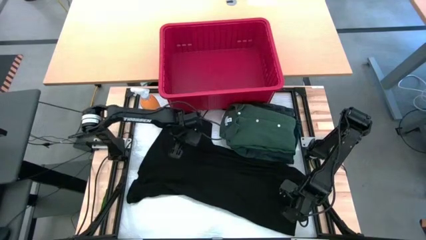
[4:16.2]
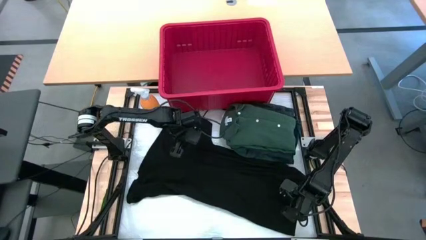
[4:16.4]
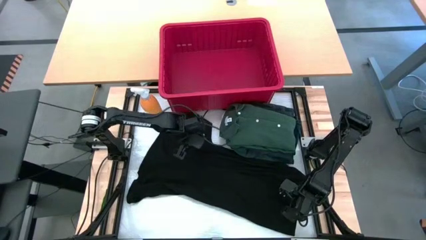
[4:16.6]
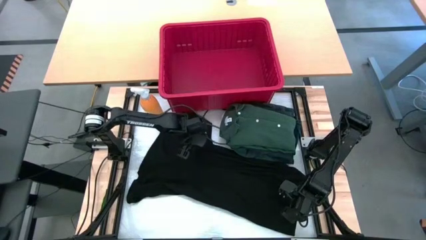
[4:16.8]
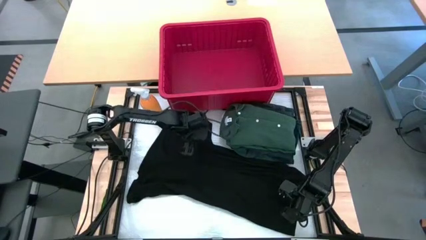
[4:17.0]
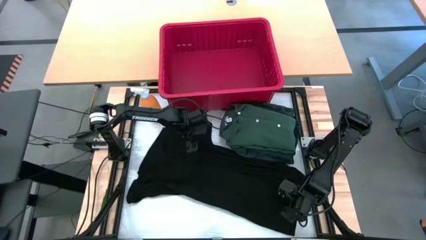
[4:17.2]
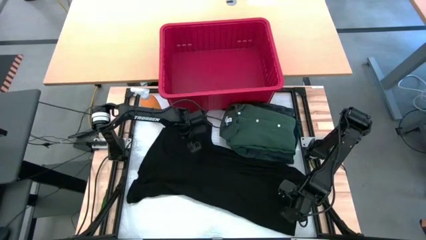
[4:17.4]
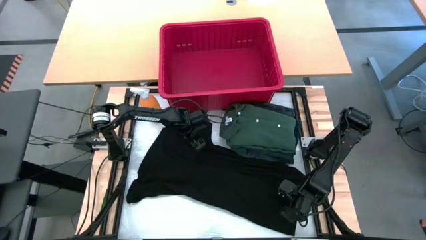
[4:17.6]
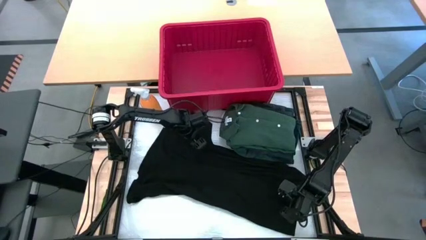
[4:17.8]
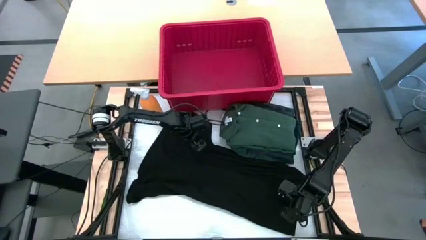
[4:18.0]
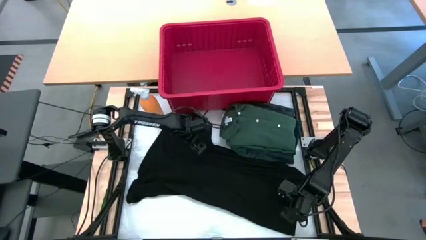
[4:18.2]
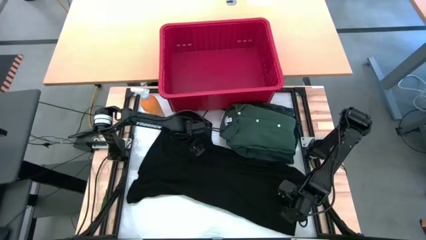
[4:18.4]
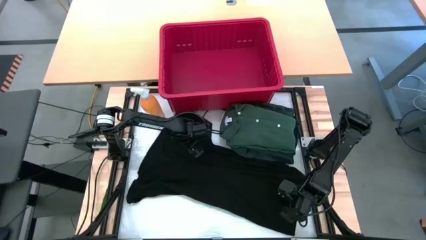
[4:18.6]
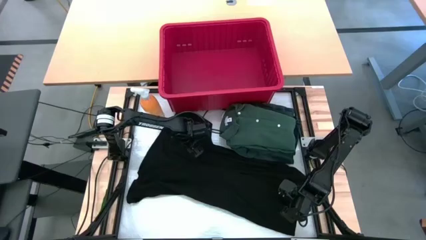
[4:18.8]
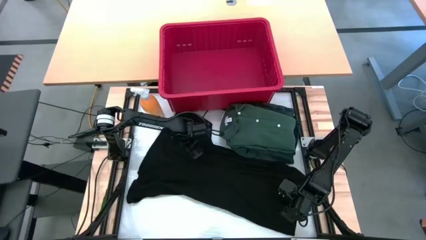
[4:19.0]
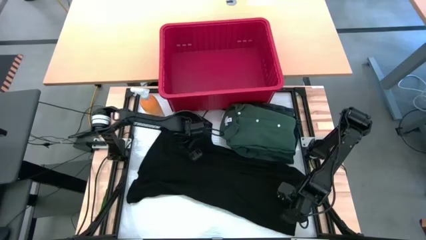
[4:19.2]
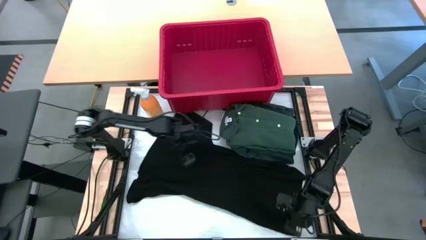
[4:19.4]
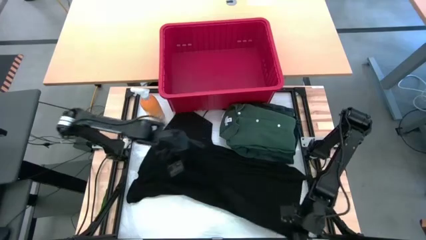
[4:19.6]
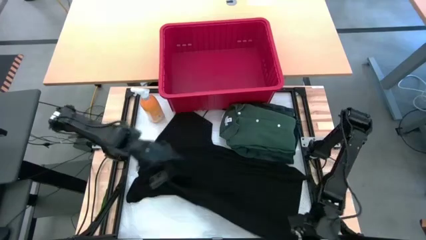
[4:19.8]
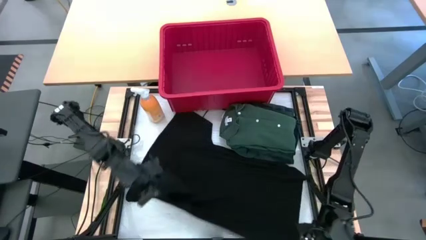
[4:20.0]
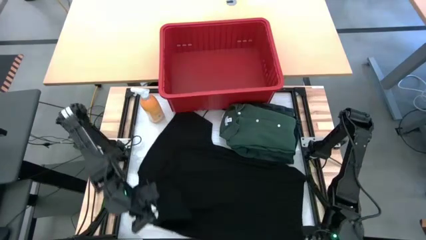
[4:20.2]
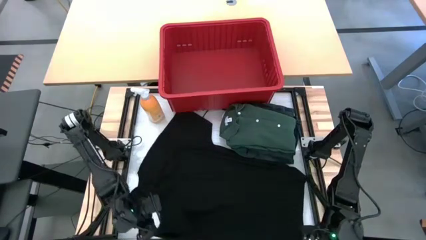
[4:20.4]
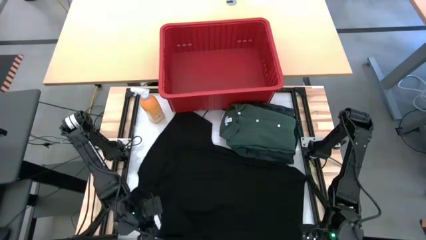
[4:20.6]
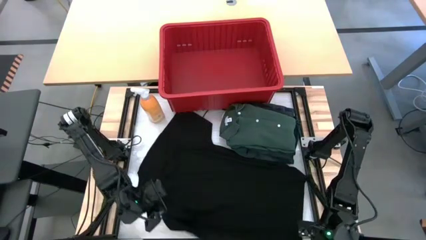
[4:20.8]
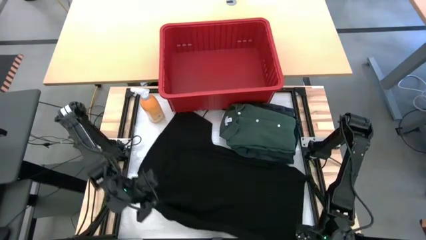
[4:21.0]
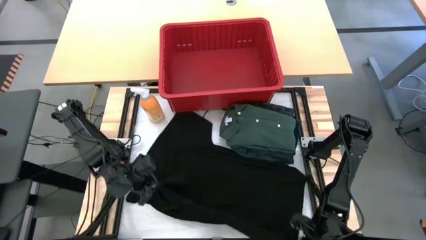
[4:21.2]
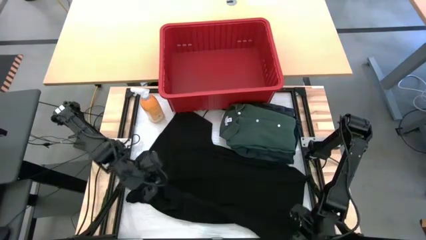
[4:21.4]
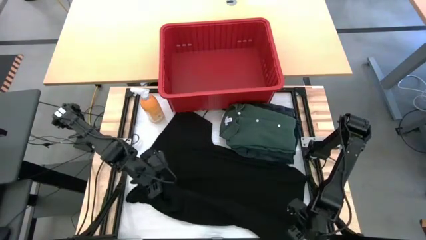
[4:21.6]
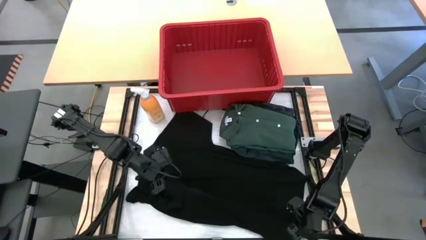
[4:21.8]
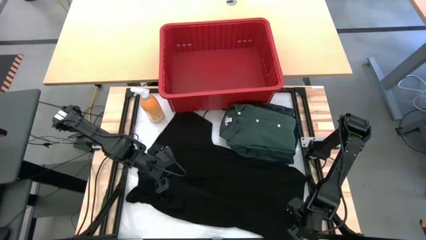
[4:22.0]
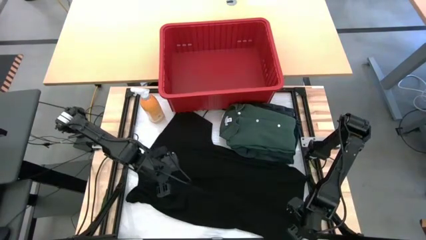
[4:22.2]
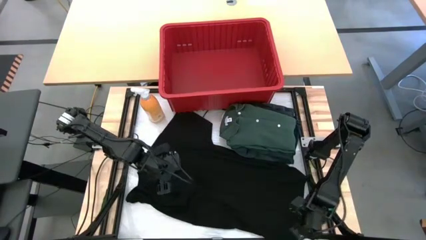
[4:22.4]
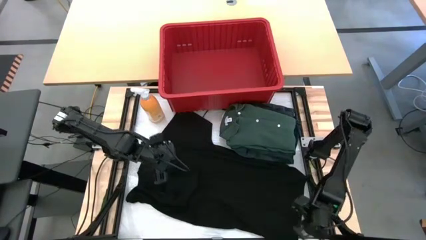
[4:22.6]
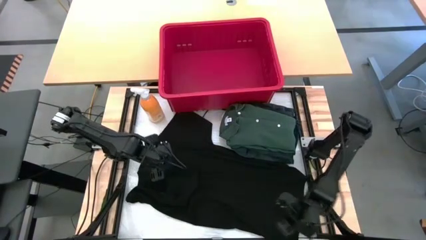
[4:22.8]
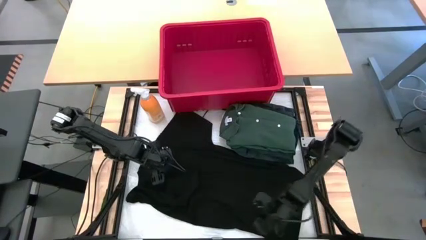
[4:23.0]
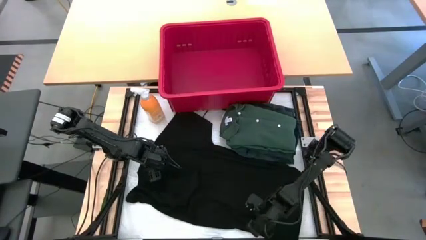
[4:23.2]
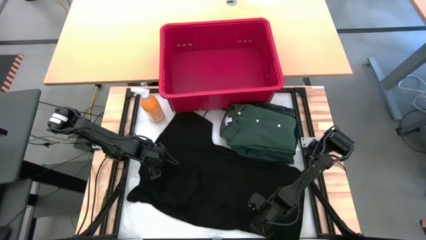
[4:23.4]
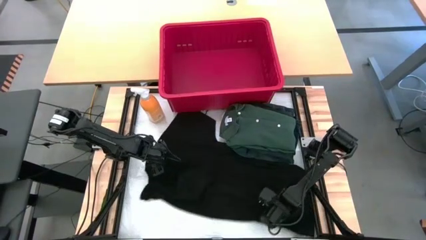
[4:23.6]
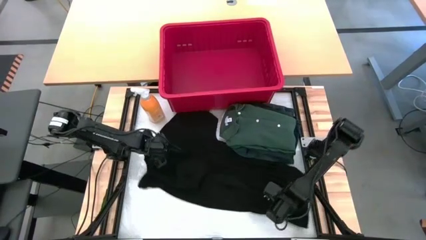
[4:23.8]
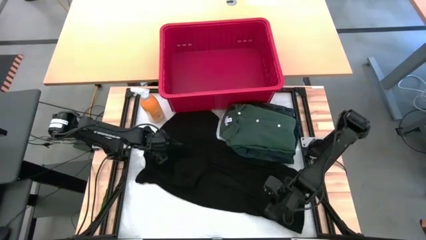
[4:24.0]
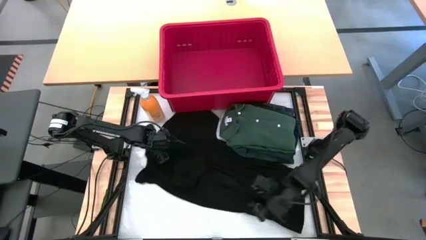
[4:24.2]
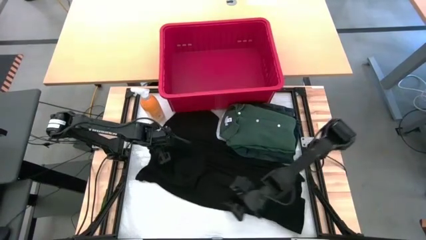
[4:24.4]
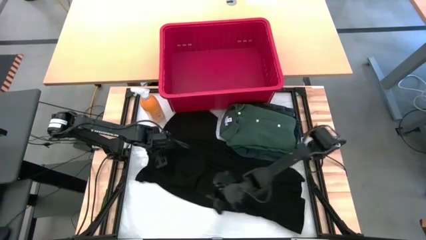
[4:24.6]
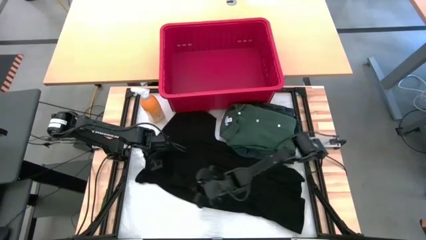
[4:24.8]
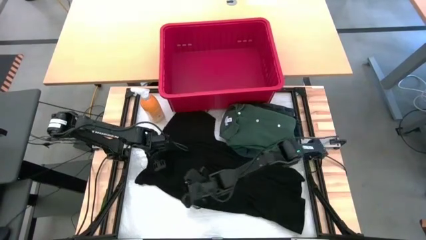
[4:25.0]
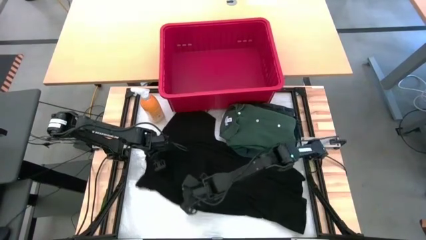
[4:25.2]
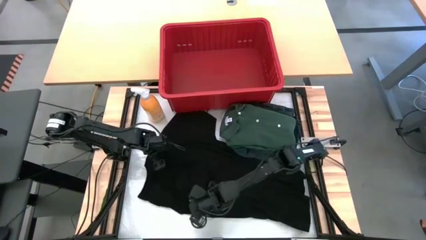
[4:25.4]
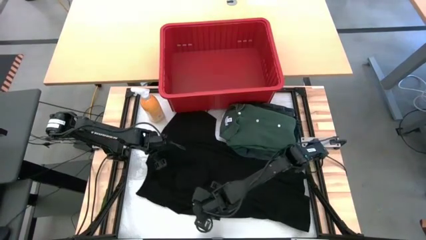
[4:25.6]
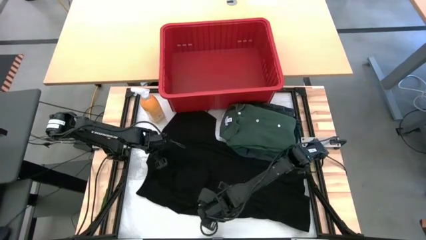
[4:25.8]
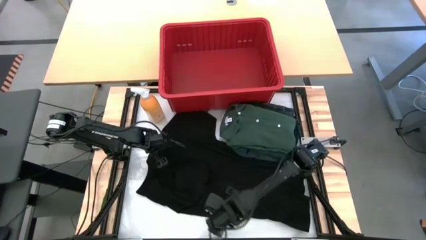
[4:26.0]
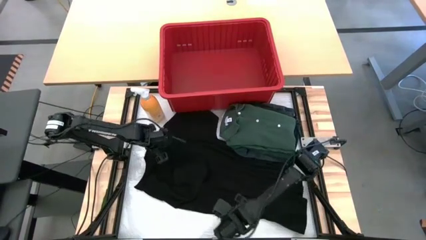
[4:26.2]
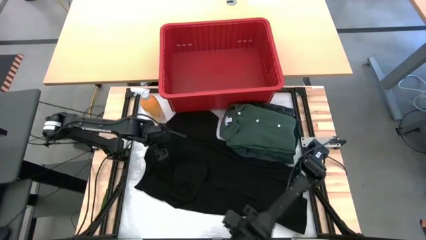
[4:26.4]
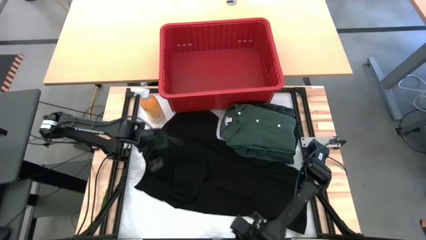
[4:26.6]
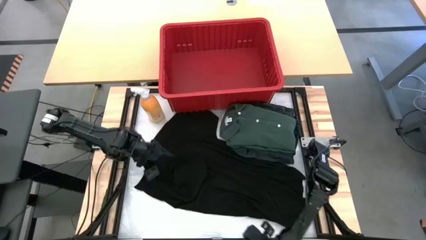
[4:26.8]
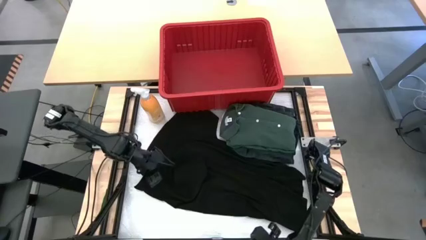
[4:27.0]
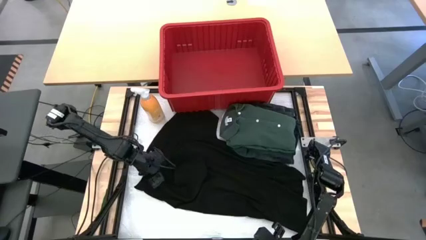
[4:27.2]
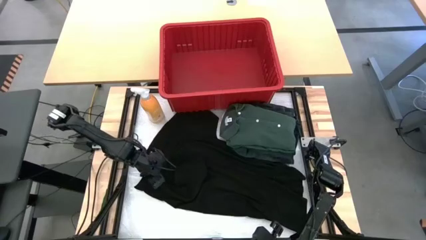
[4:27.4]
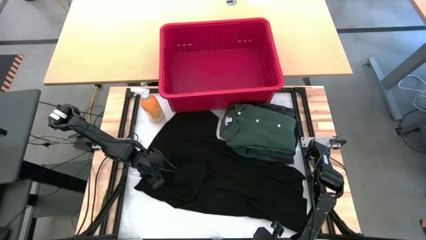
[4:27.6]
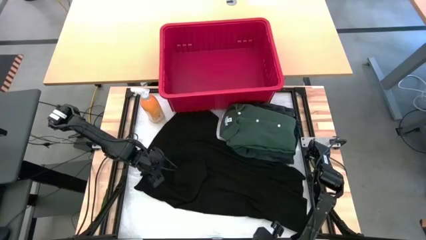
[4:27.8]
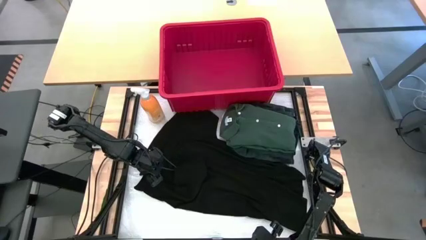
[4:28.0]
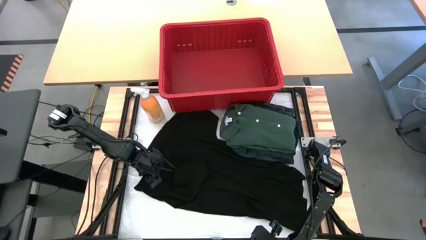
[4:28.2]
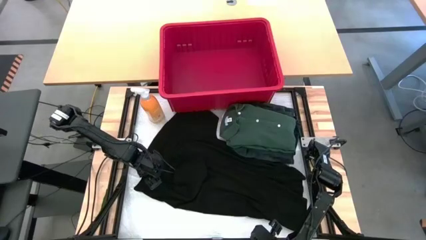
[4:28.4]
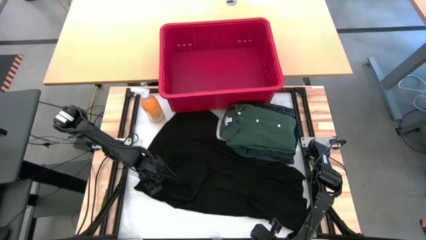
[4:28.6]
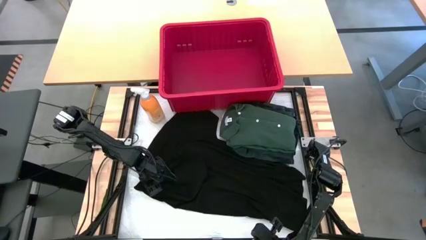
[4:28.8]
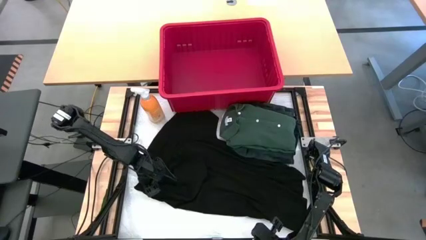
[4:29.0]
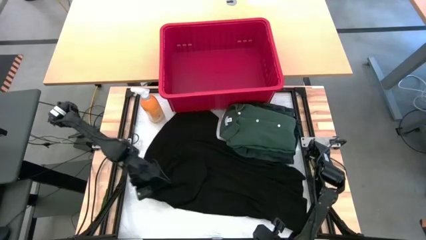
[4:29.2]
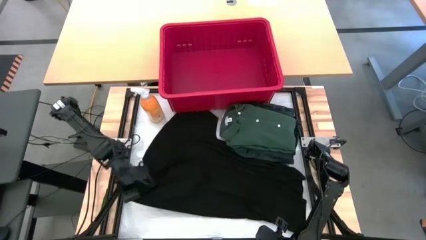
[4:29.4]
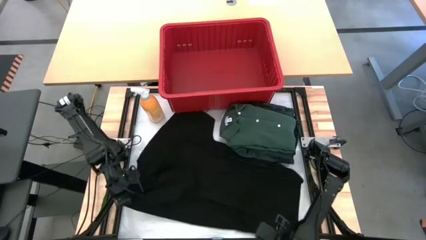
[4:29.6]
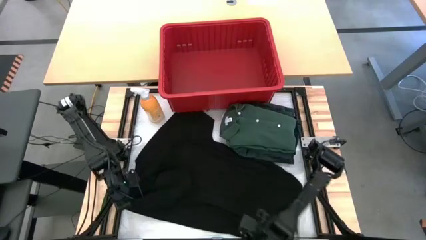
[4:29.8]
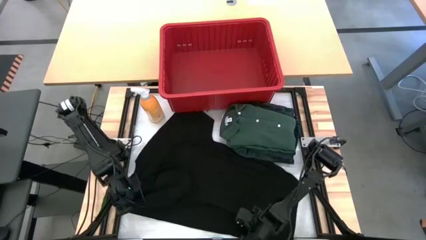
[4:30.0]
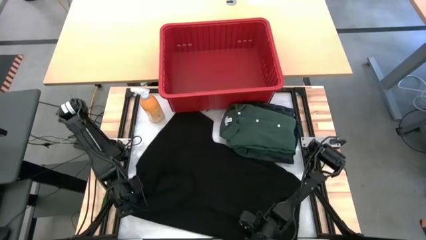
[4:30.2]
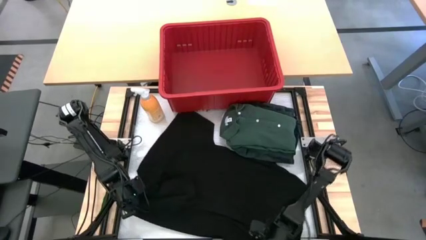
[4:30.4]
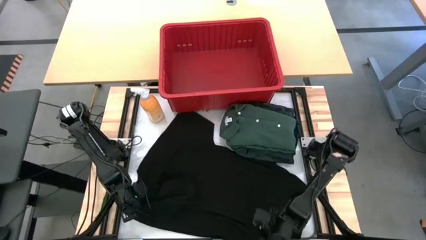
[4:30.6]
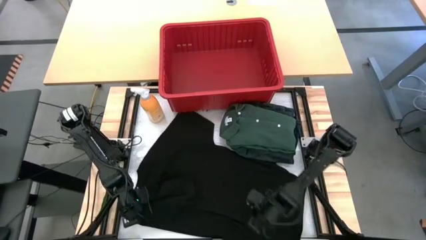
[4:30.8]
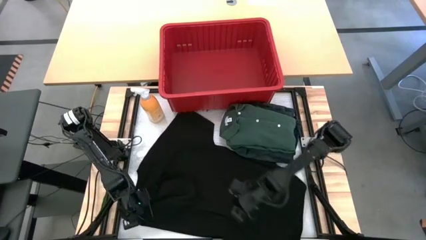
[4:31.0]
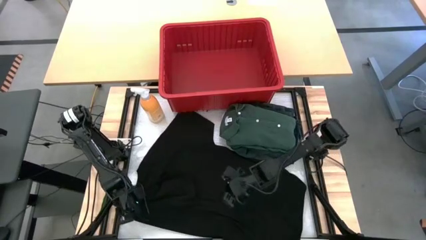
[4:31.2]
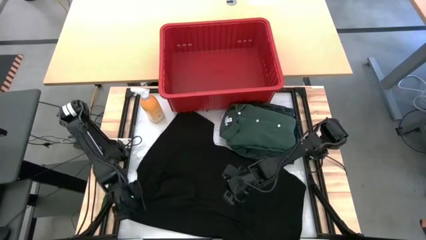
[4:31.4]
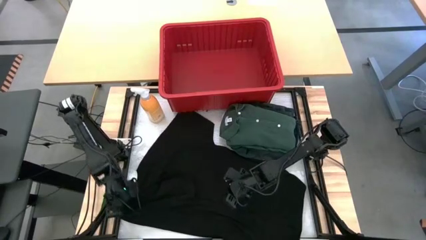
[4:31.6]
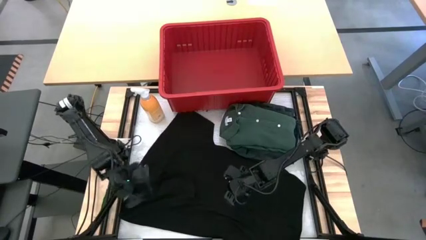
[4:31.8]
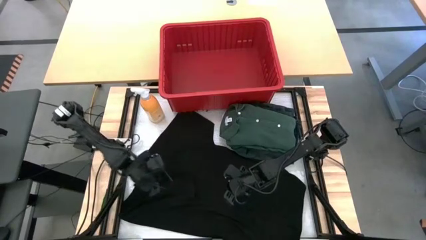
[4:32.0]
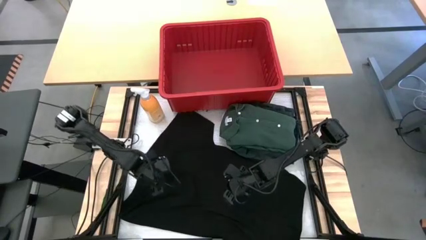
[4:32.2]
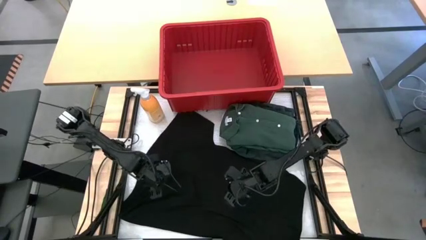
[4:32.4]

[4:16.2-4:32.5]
Task: Fold laundry
Fold the black shirt
